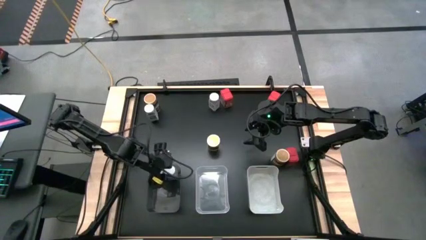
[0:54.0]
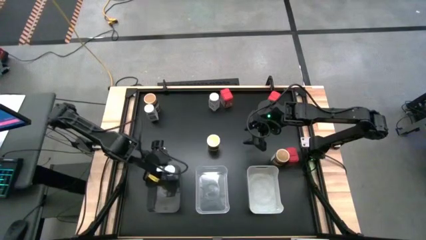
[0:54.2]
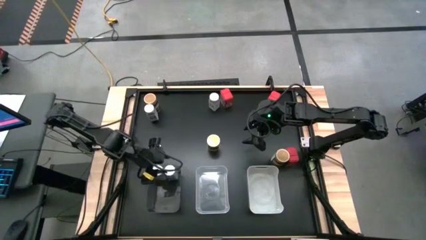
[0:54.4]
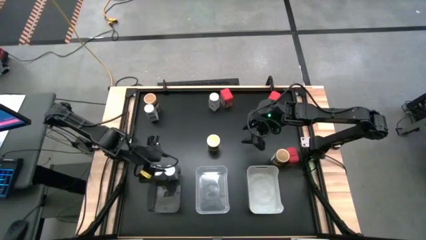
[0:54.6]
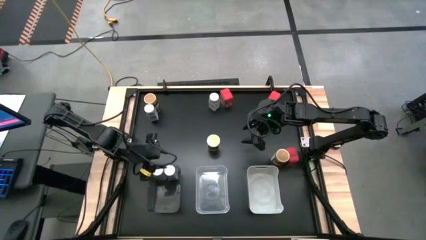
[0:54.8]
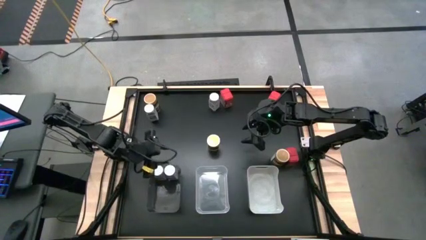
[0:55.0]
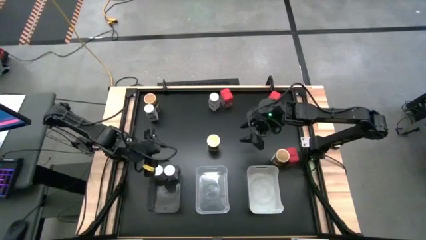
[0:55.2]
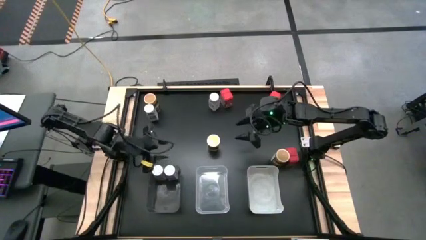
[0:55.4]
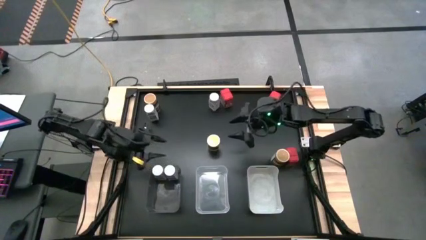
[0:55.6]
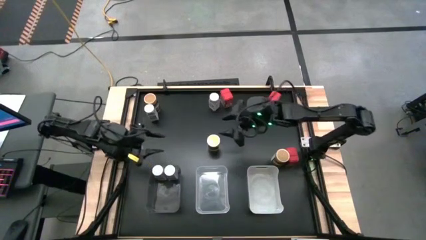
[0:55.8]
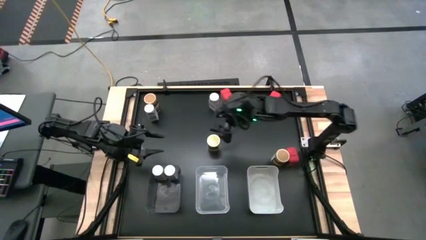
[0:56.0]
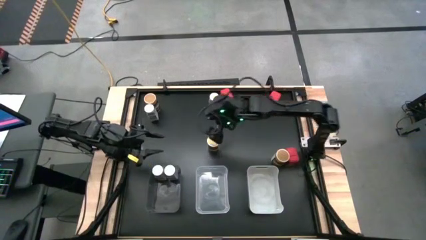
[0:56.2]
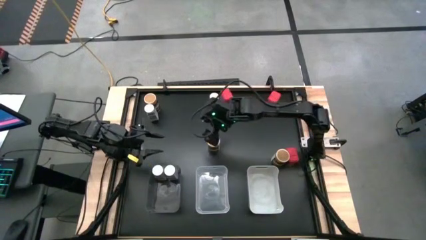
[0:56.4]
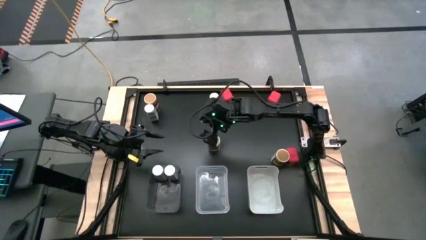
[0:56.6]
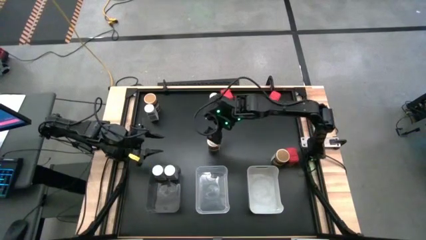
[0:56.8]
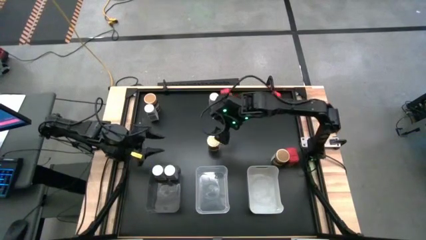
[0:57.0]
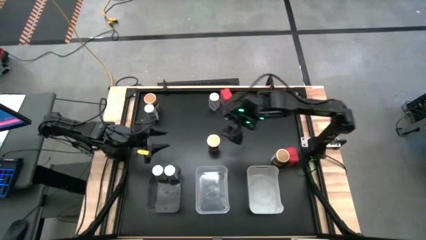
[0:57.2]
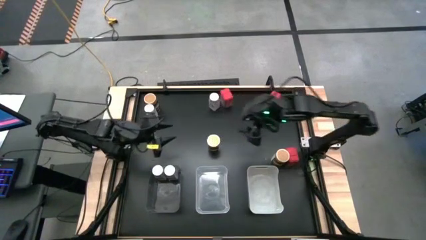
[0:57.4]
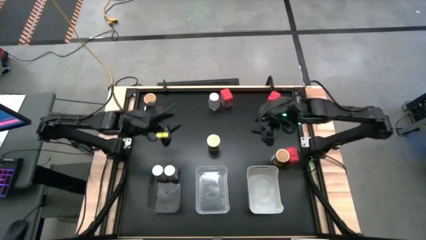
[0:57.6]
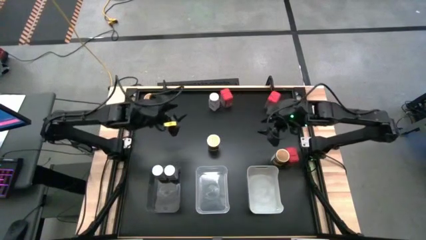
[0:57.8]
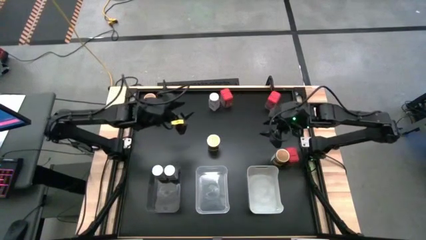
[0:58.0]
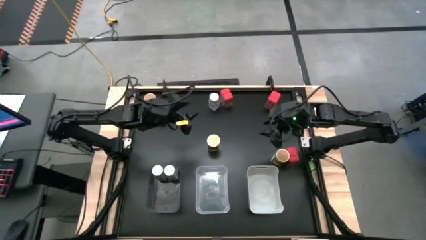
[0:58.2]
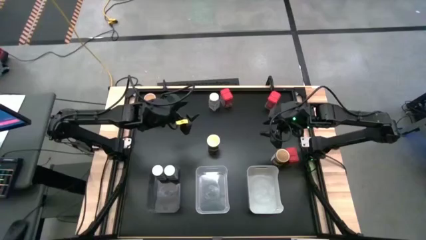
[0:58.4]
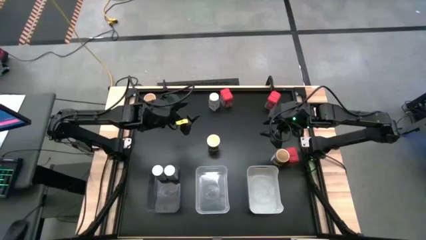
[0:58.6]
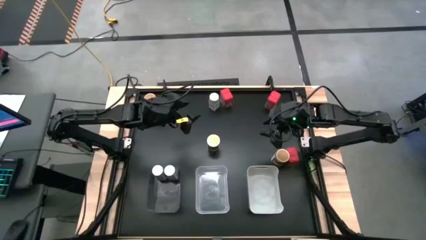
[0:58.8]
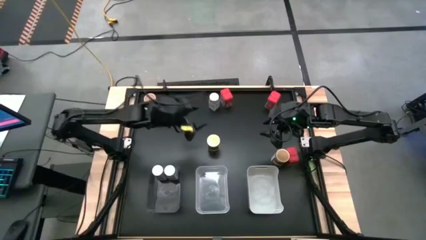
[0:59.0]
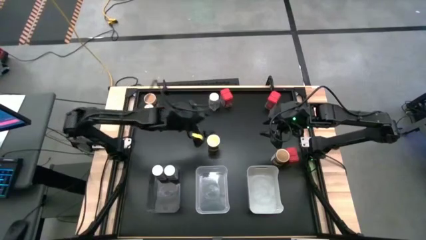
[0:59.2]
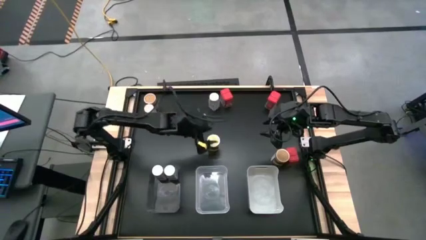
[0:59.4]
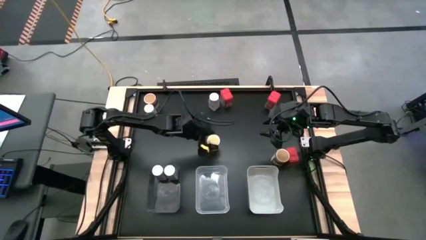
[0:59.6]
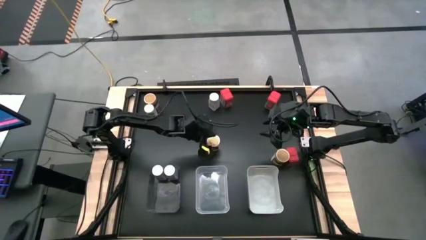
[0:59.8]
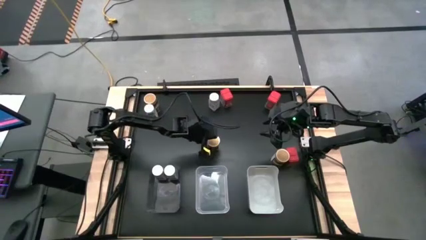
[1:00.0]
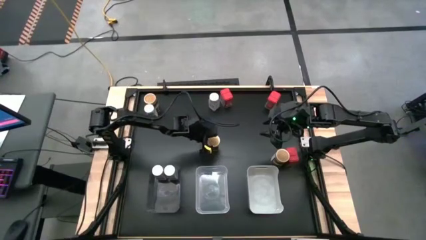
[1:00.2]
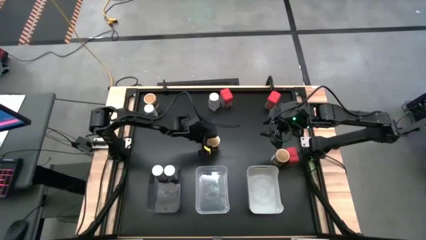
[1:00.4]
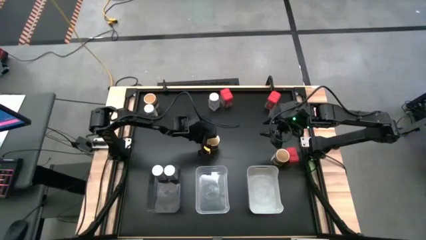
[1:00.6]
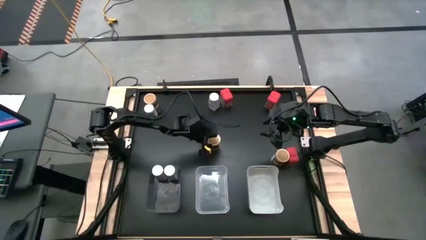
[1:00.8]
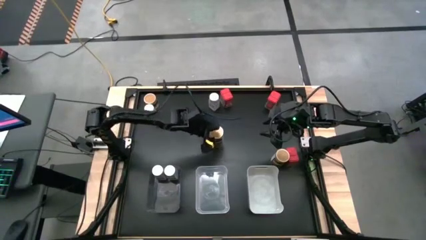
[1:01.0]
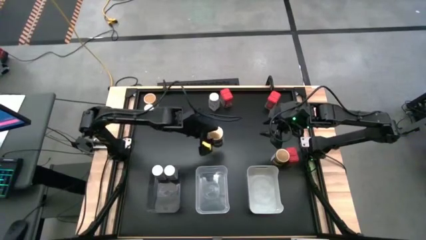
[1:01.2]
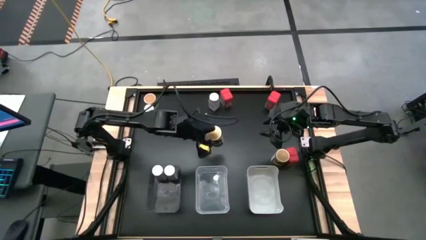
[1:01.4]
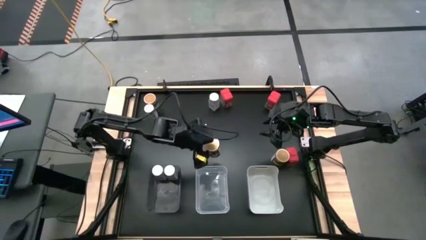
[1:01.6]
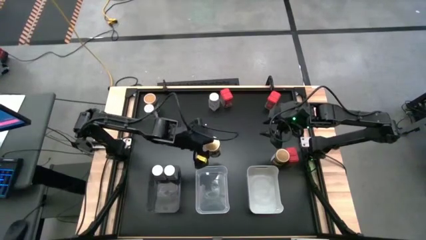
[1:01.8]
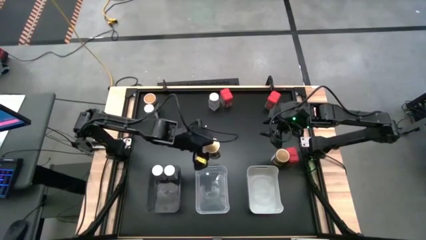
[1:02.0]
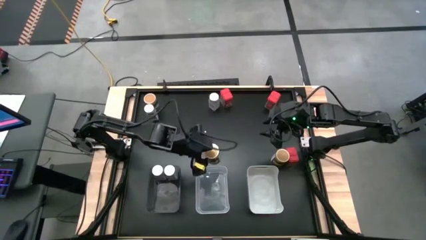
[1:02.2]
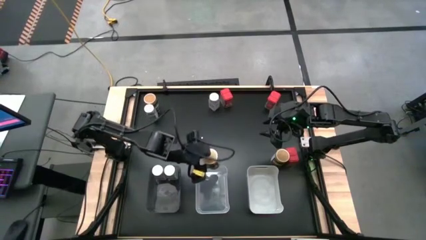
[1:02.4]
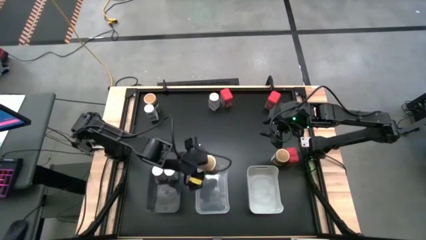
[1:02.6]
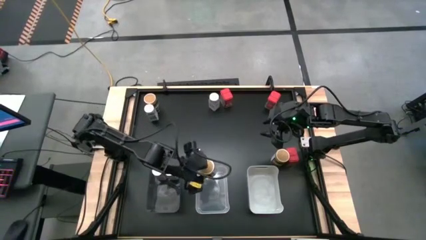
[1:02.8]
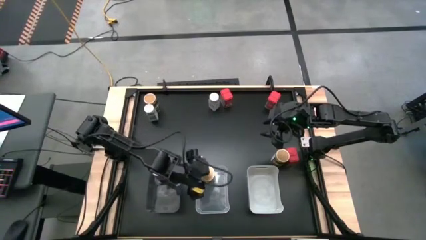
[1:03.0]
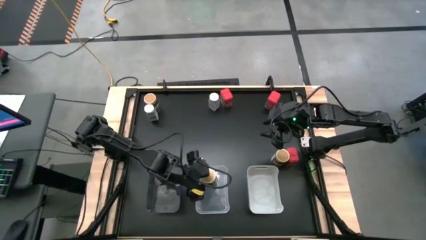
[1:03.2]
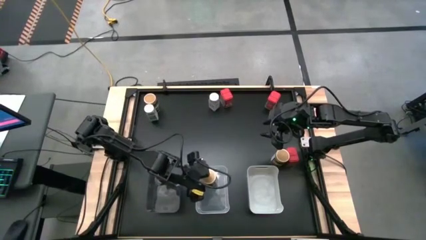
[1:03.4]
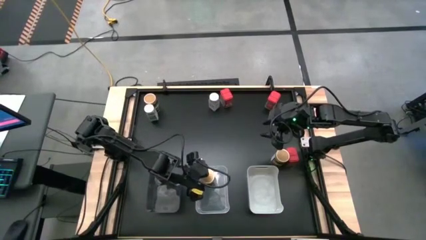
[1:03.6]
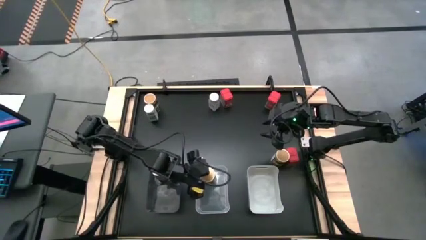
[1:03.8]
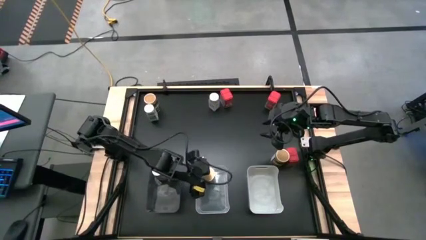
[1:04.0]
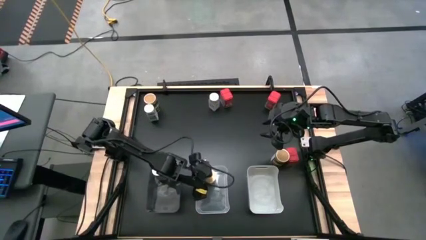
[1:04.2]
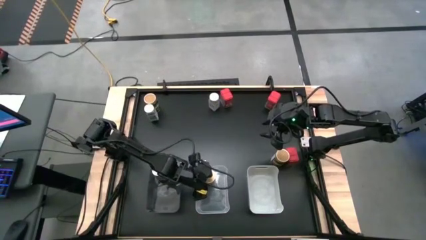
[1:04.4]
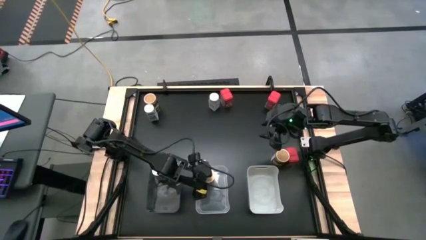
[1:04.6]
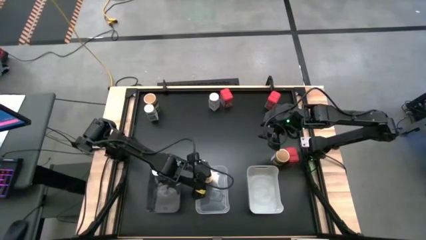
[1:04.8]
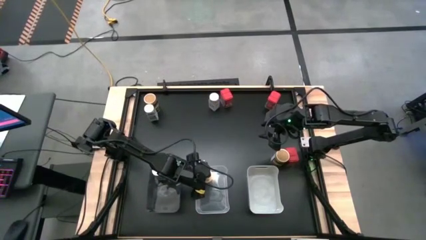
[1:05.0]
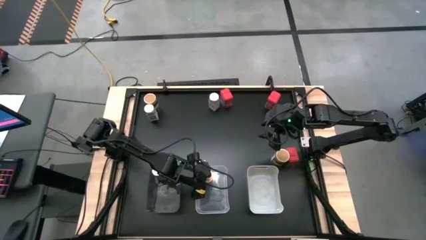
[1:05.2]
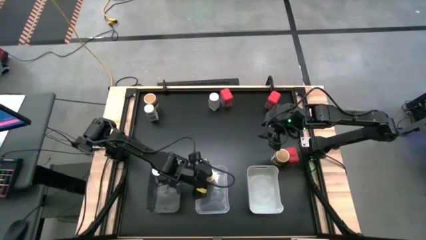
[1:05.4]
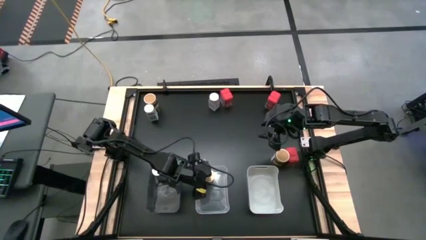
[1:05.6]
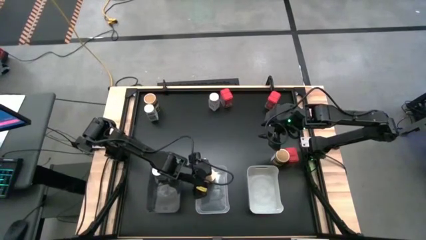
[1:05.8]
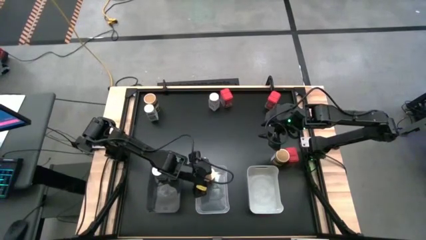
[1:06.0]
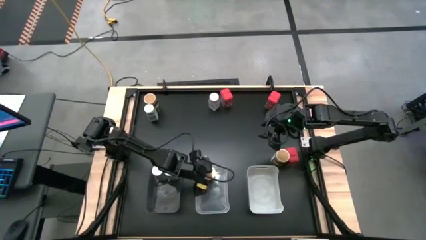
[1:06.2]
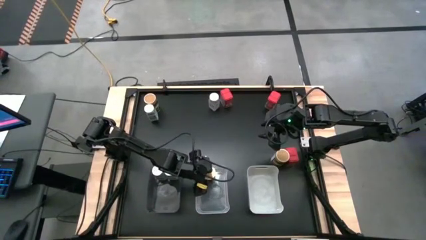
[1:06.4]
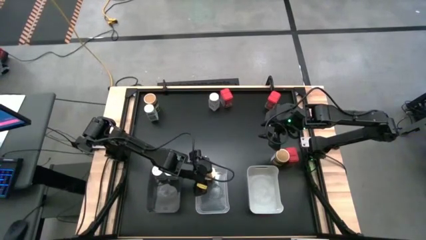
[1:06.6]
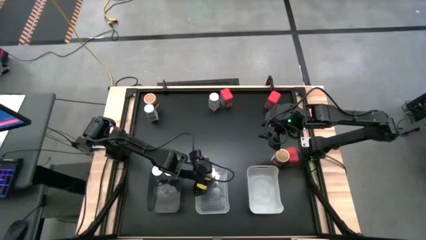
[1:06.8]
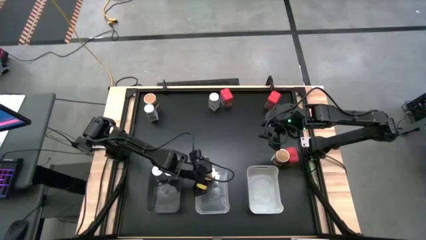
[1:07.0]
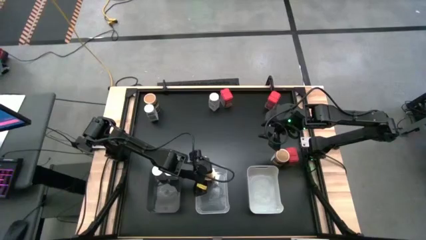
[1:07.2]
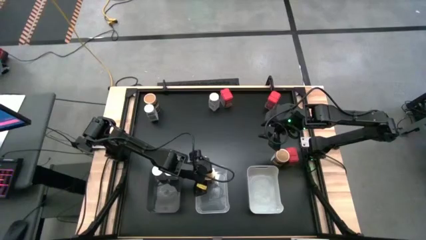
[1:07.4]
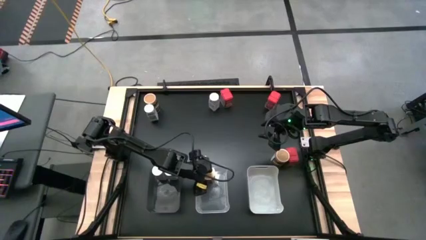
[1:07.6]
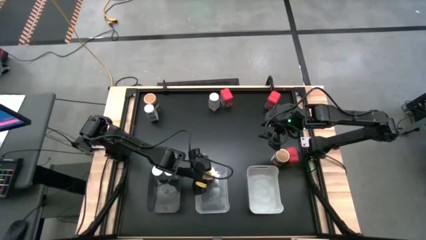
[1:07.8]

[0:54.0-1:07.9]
Task: Sort spices by type
Put the middle golden seasoning bottle into the transparent bin

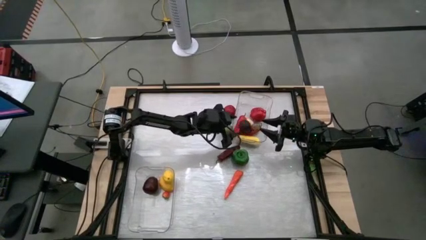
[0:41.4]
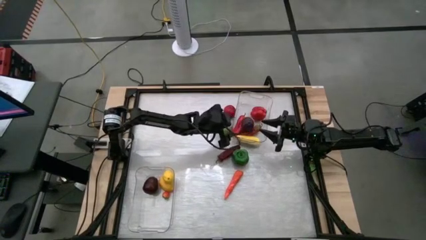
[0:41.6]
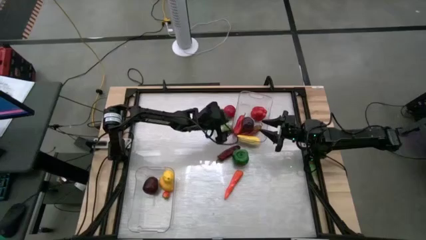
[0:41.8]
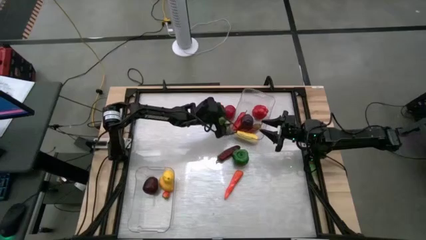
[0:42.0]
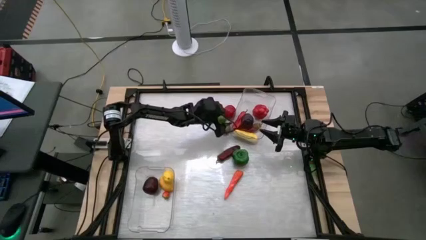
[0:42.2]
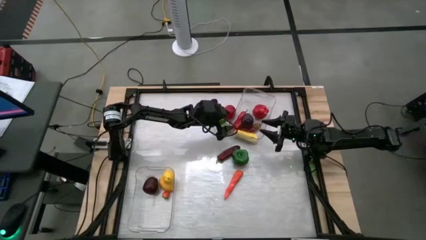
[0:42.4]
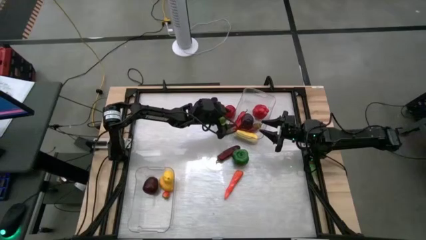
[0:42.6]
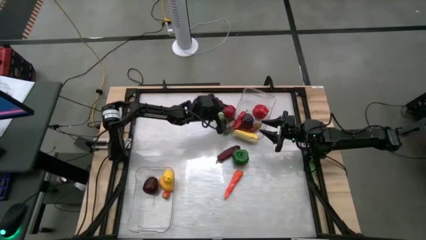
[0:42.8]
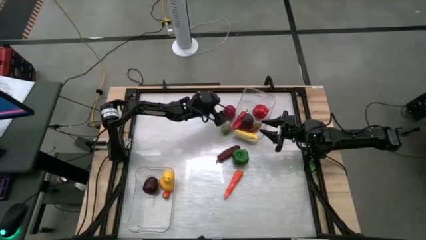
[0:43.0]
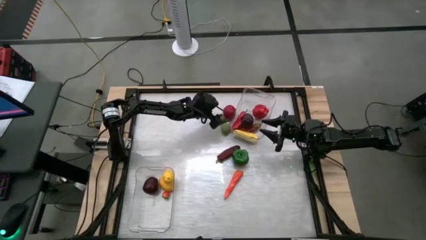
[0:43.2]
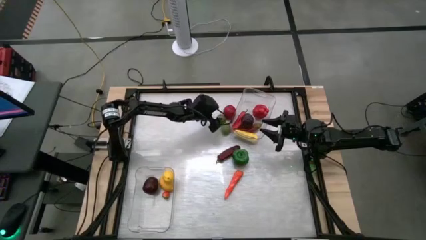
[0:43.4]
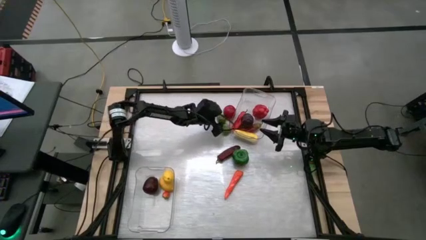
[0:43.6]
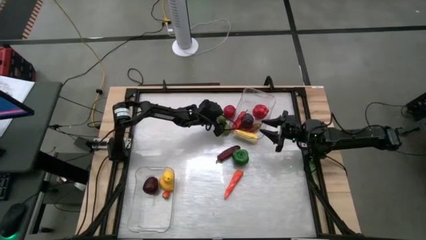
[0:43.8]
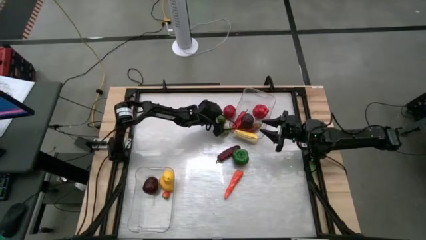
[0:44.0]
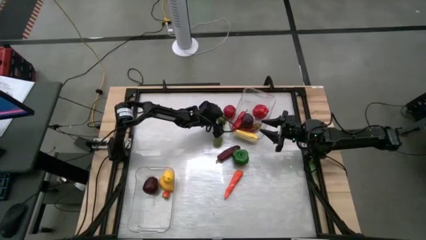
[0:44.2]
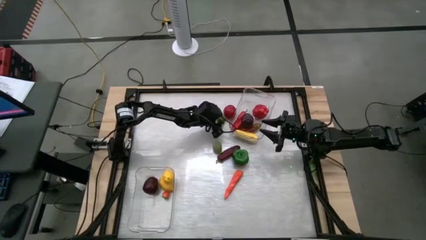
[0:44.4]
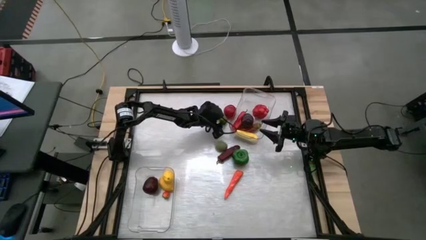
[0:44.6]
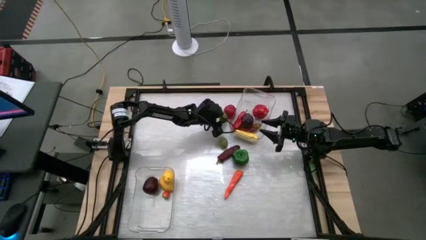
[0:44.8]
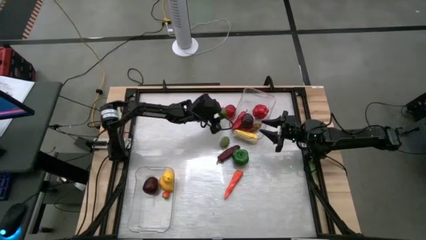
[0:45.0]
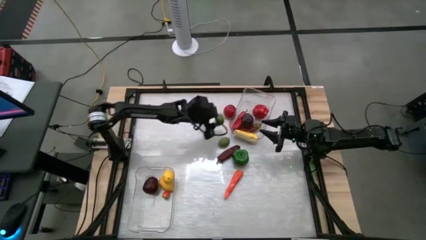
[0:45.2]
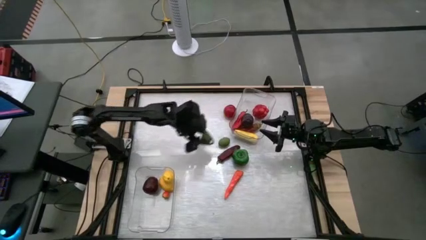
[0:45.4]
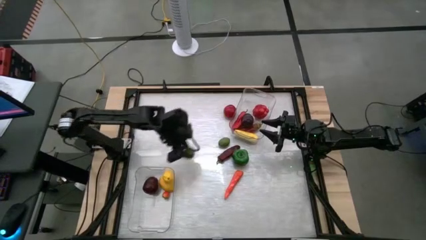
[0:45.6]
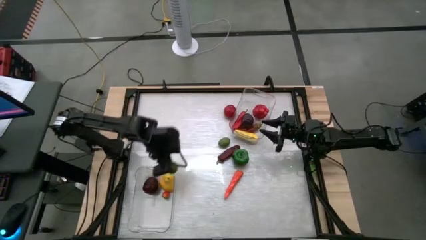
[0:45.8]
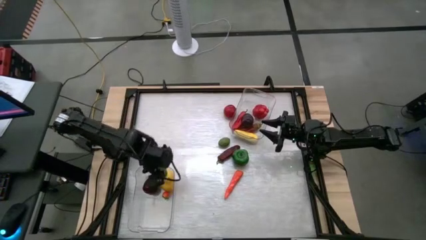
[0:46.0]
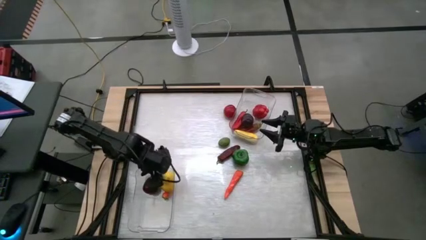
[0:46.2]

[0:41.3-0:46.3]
Task: Sort produce into baskets
Put the top green lime into the bottom transparent bin
